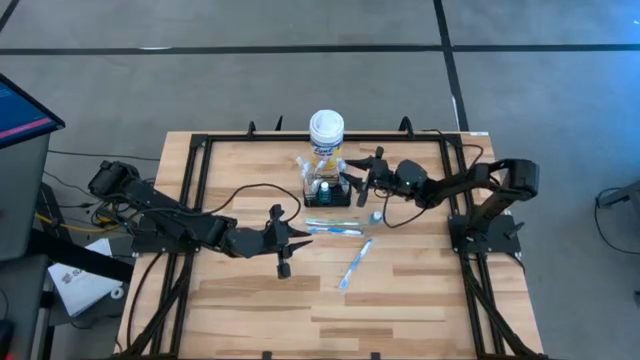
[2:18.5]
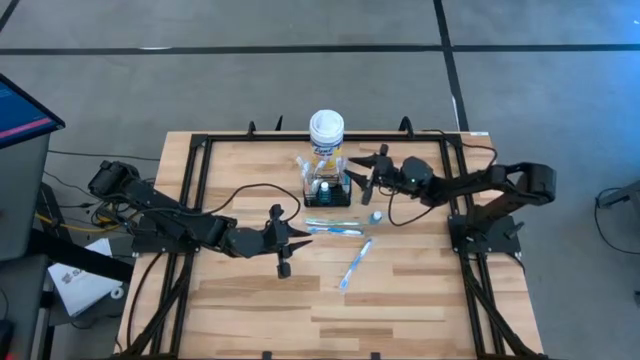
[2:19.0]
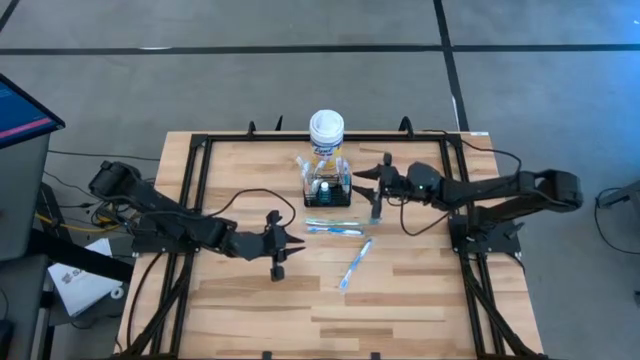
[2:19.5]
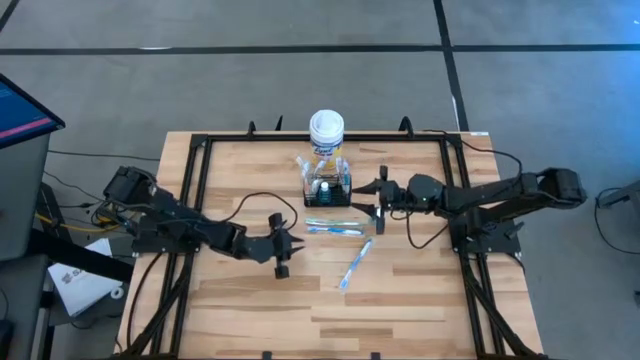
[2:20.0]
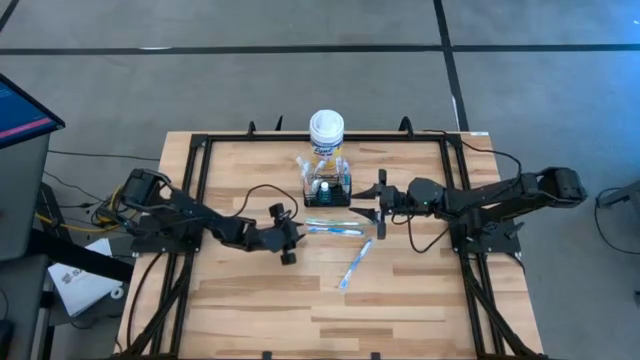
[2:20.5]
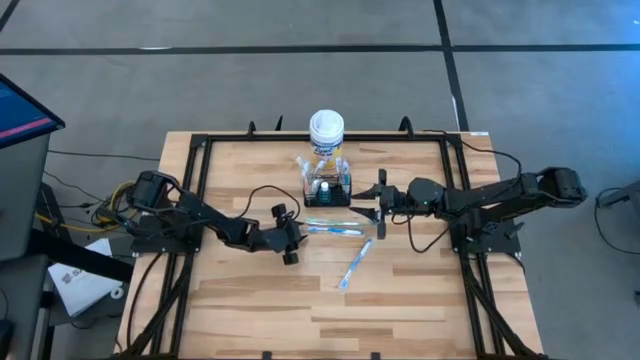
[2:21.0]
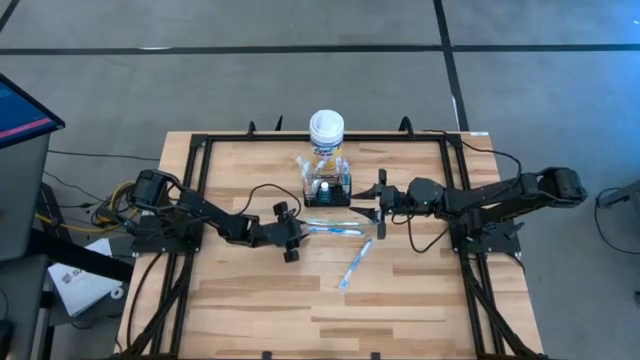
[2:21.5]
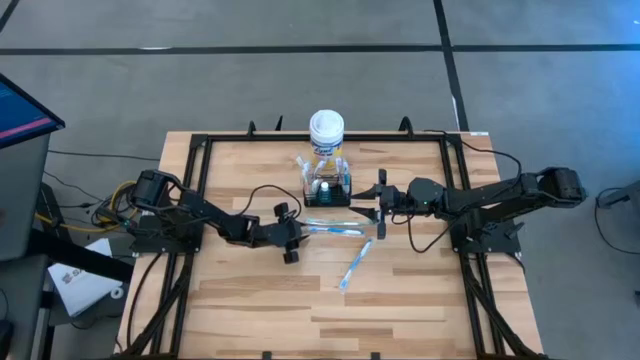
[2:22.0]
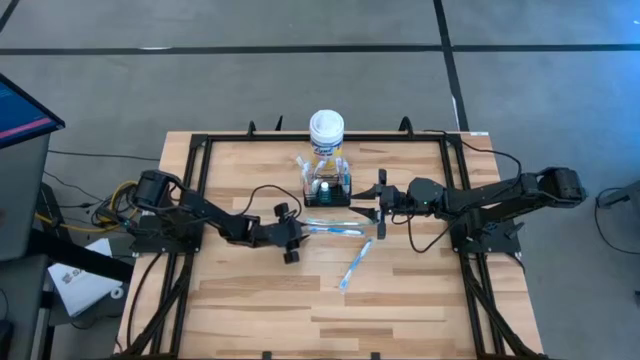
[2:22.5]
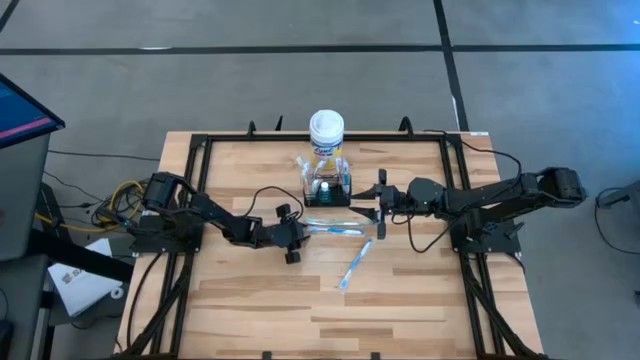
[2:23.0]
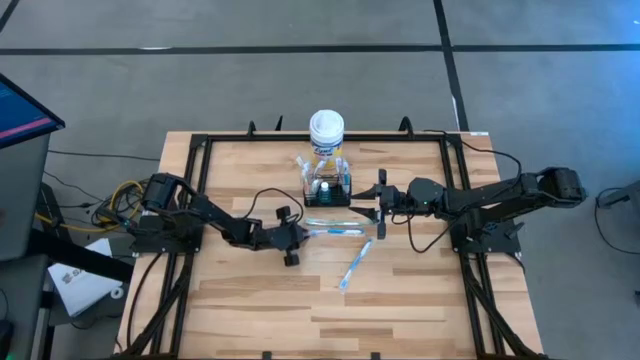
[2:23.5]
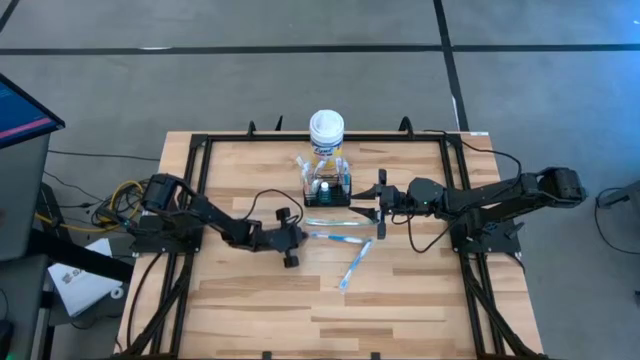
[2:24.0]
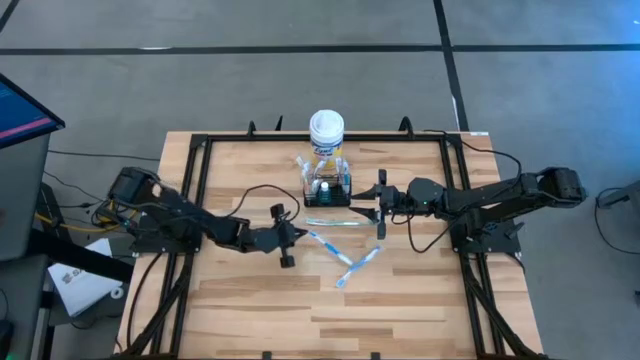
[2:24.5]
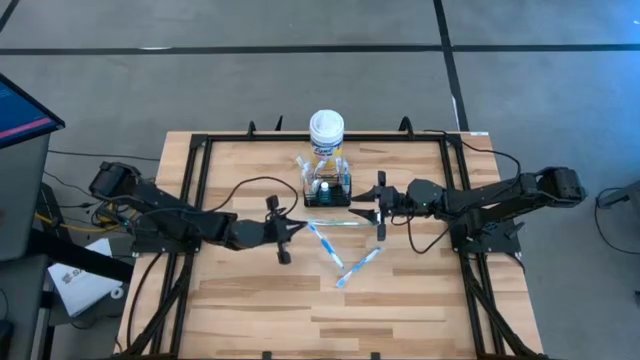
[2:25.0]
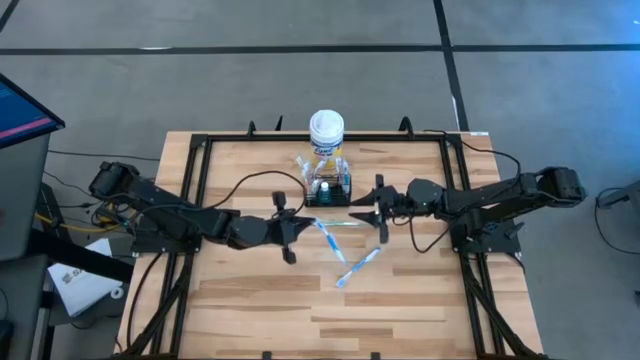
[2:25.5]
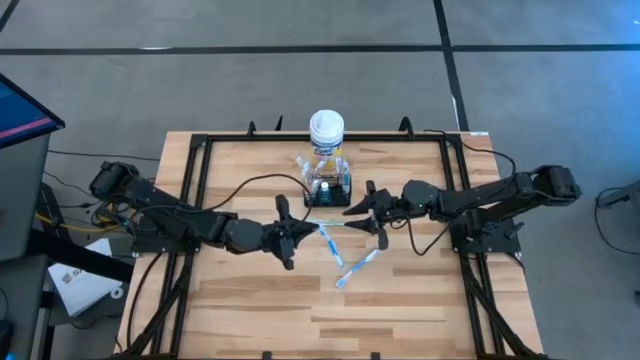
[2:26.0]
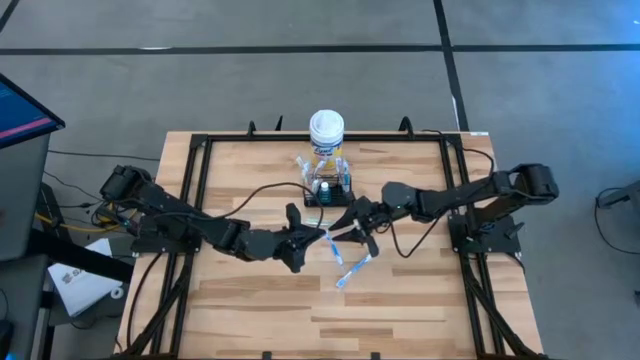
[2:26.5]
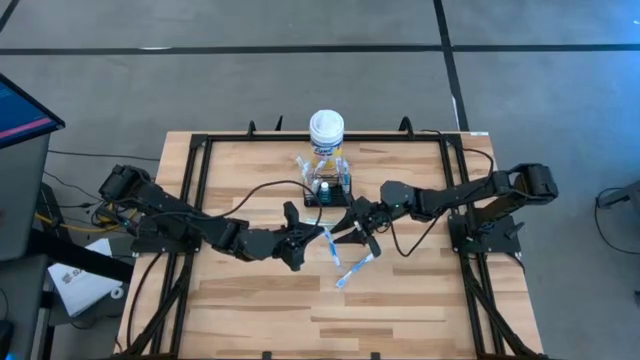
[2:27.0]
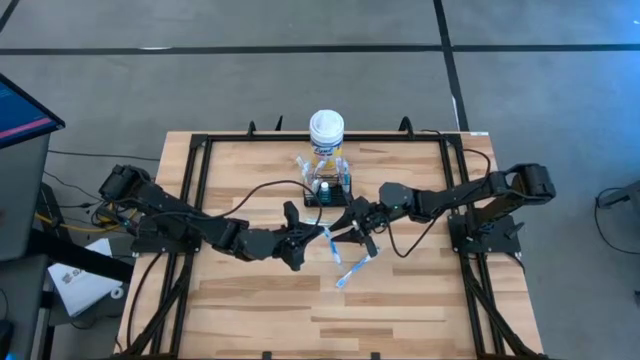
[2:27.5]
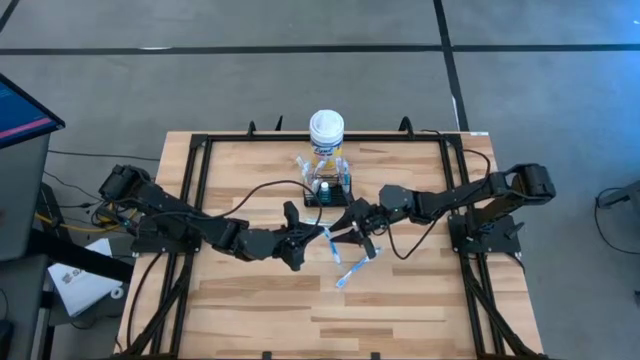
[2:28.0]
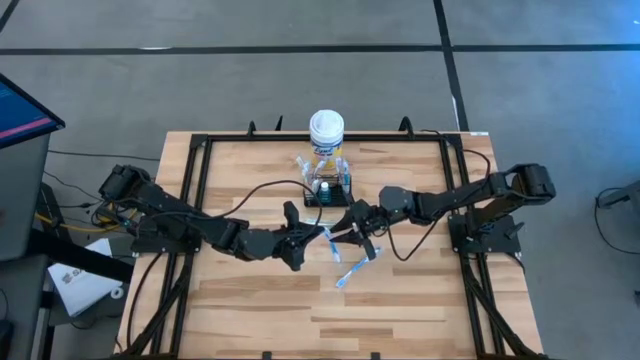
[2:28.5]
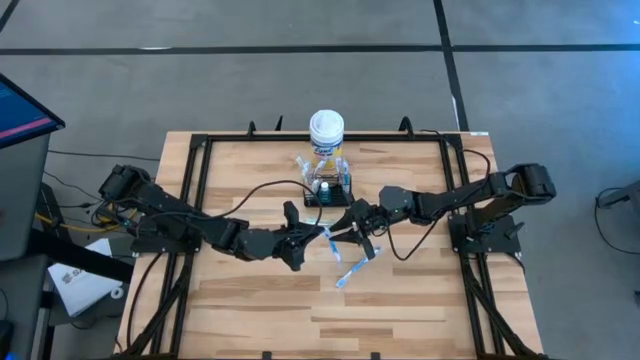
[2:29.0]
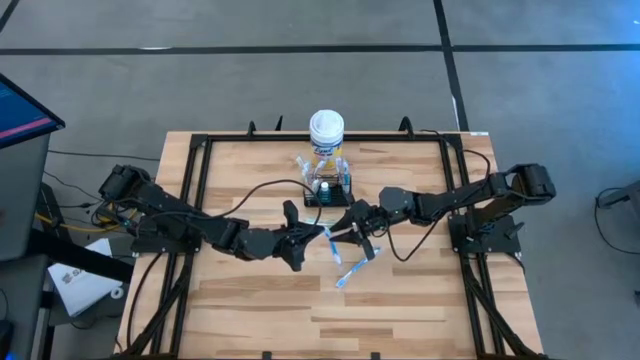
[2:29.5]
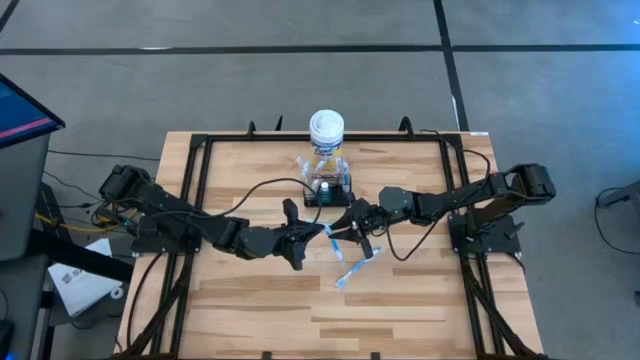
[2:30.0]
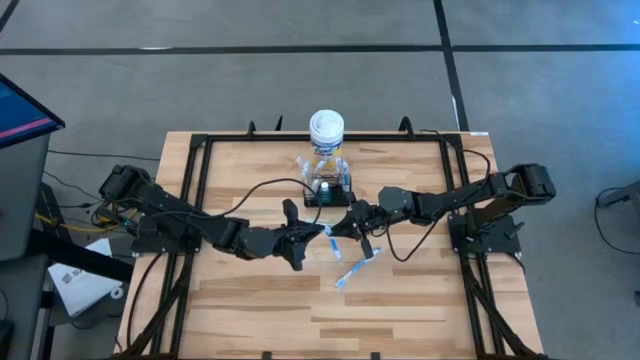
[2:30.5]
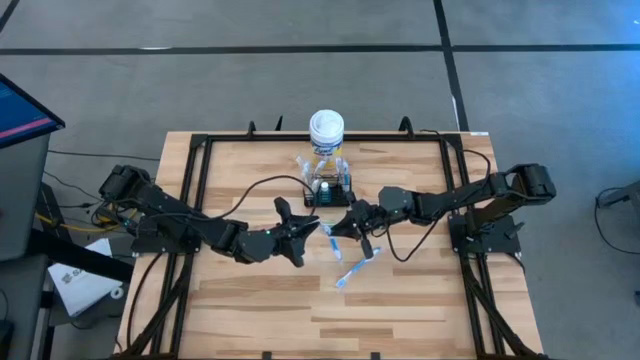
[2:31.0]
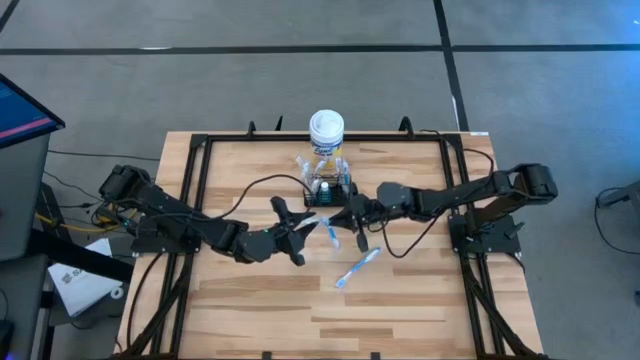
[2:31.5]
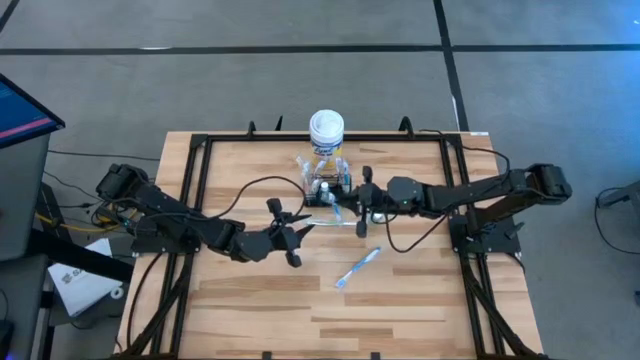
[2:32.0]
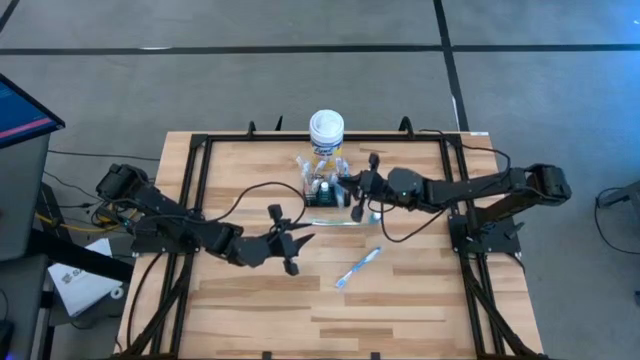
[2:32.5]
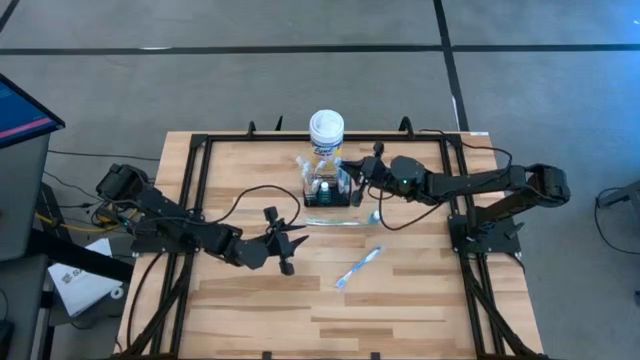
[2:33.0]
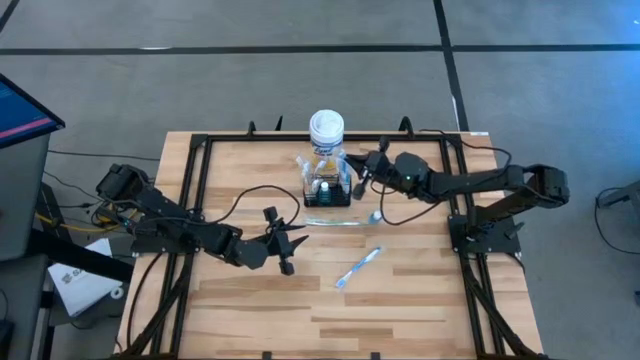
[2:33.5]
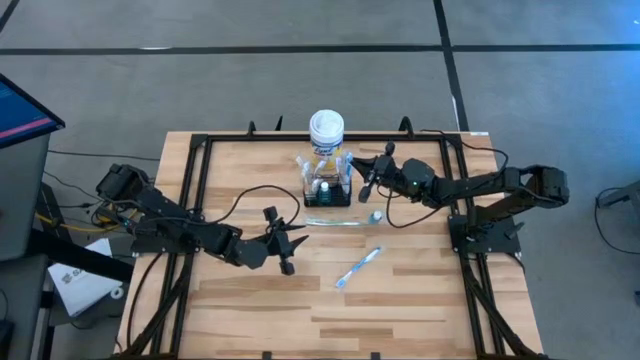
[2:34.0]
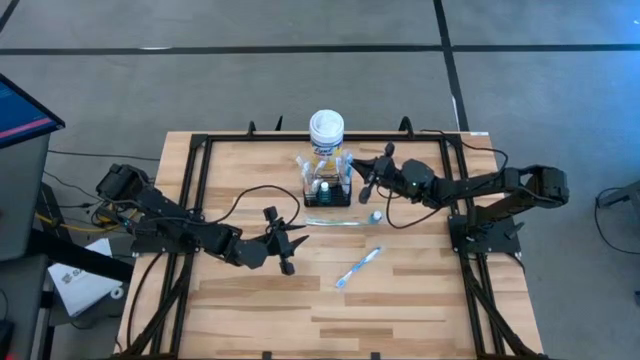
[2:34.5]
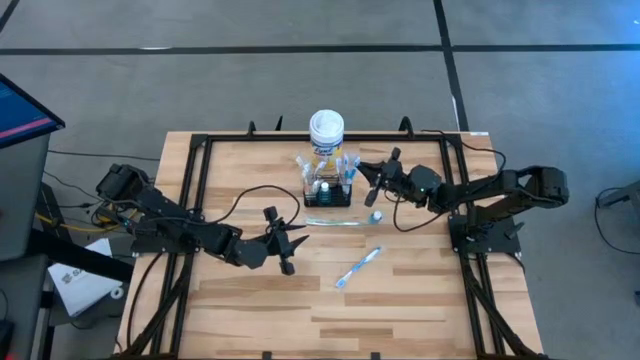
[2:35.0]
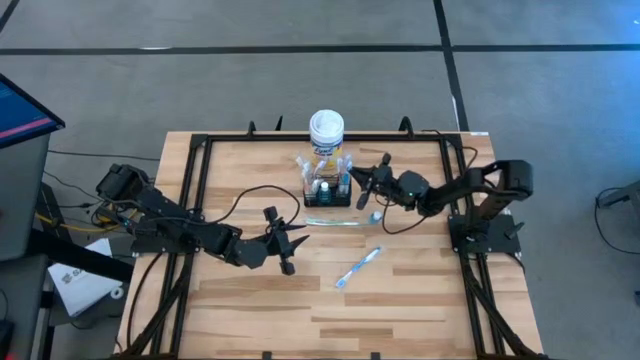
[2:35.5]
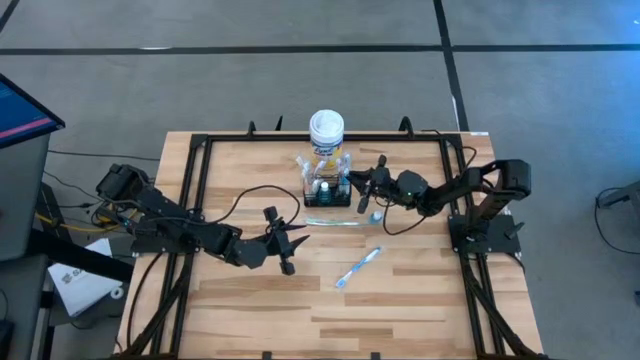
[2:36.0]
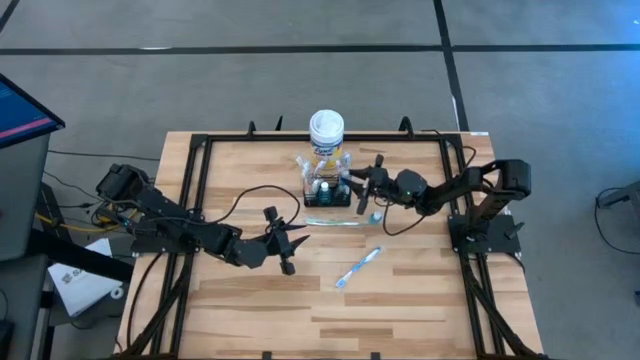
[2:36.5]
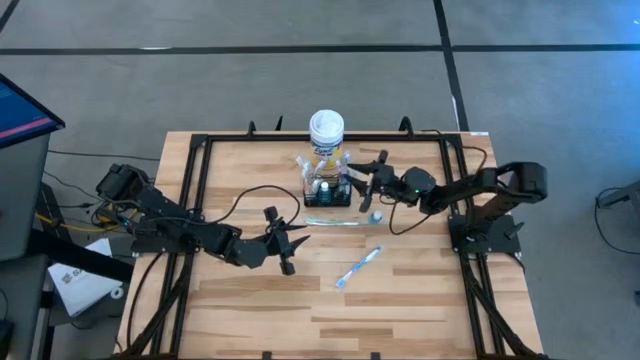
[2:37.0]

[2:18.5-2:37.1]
Task: Pick & Place toothbrushing station
Put the blue toothbrush into the black wire organizer

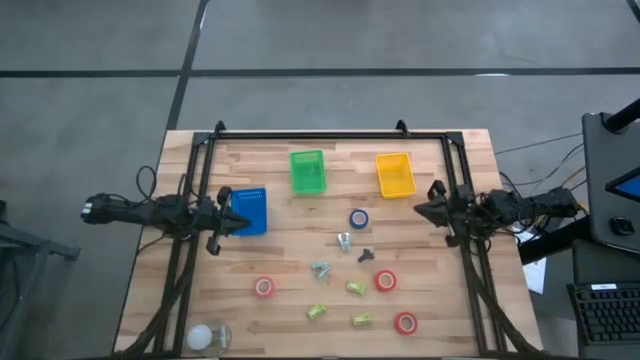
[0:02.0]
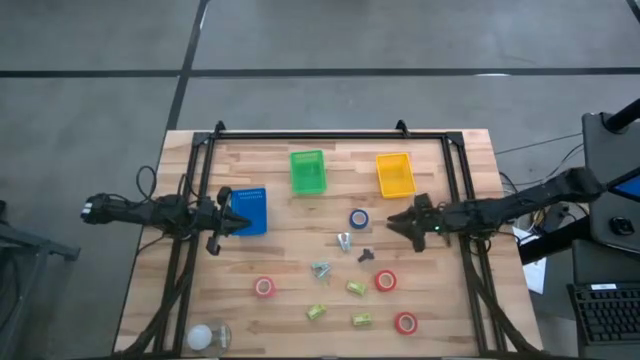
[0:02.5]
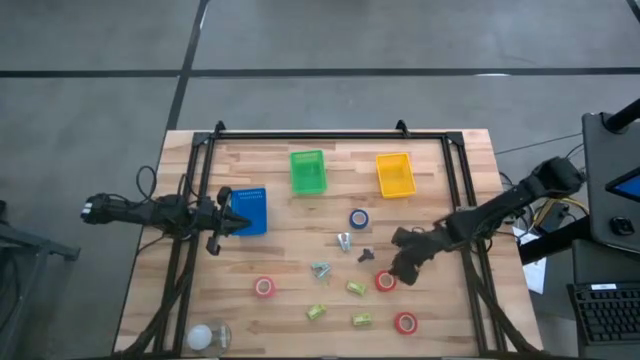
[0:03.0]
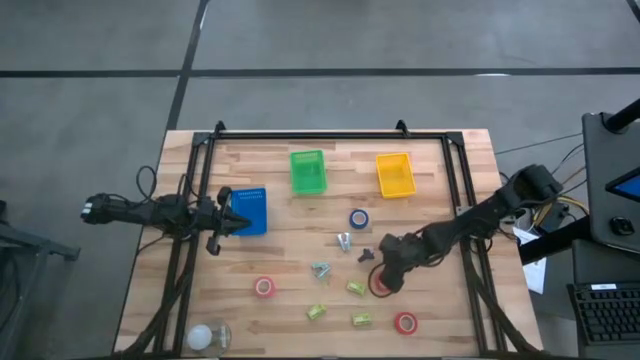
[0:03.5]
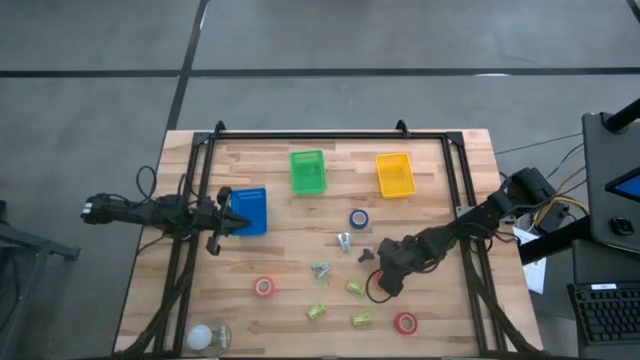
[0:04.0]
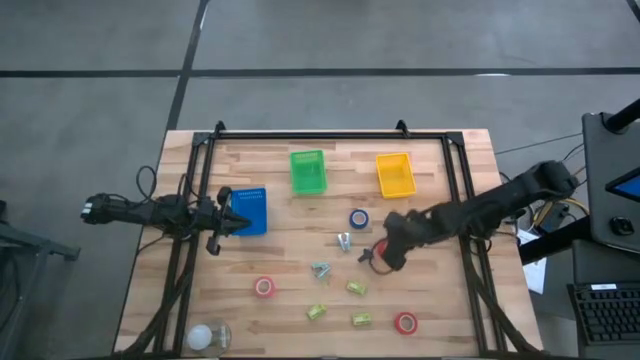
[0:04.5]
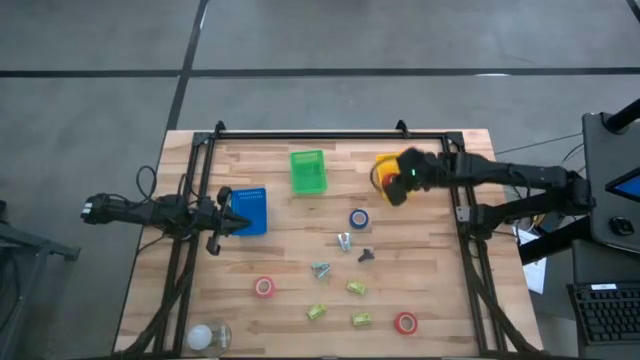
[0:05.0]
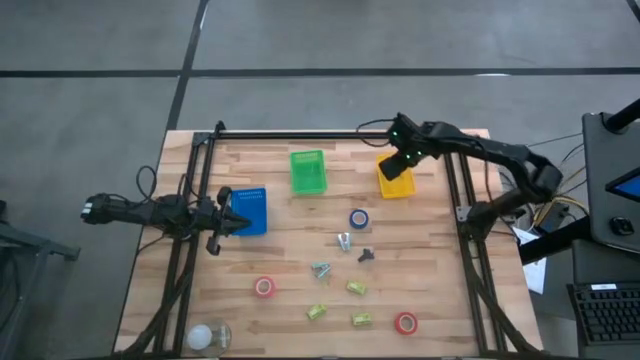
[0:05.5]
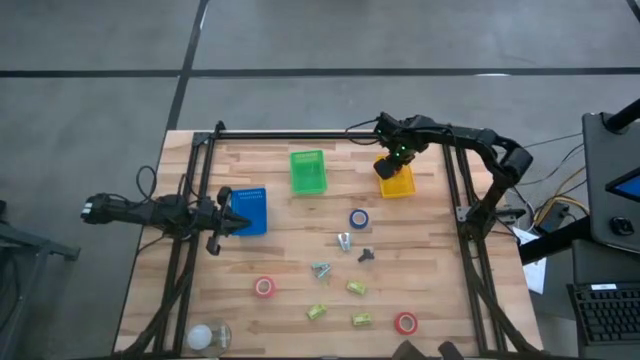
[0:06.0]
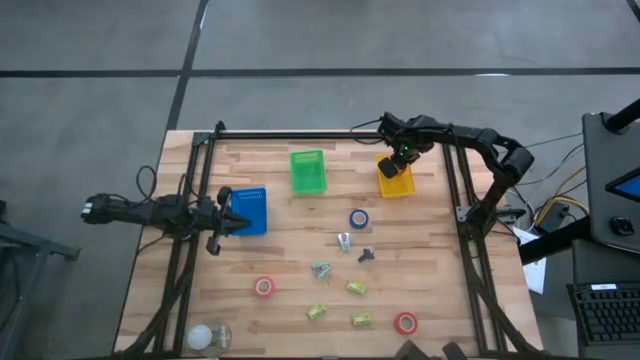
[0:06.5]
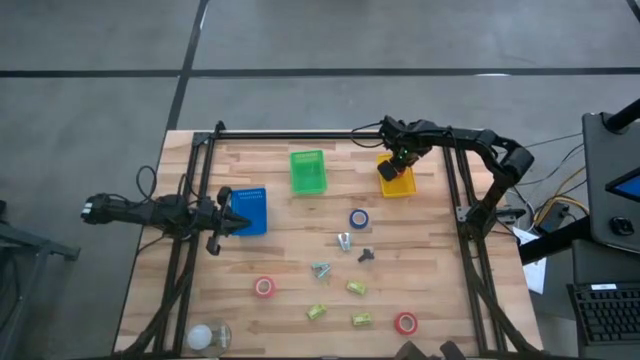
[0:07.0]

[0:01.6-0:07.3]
Task: Pick and place Stapler, Stapler remover, tape
Put the top orange tape into the yellow bin
